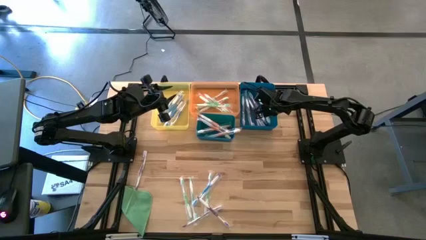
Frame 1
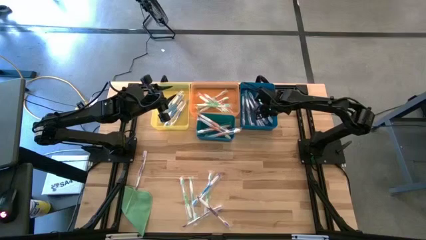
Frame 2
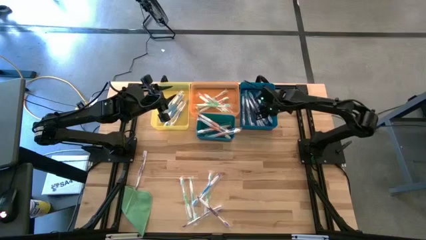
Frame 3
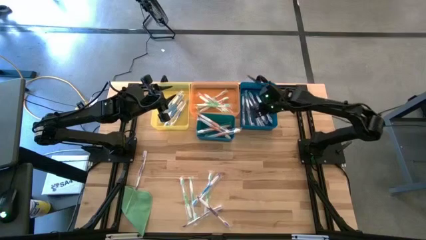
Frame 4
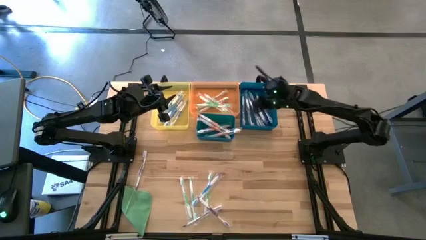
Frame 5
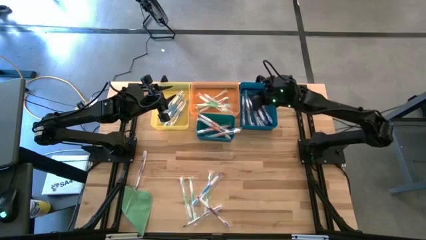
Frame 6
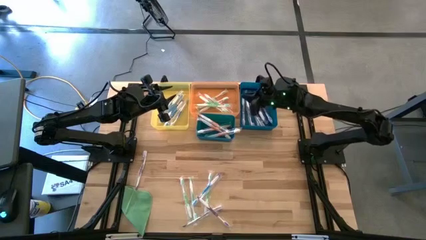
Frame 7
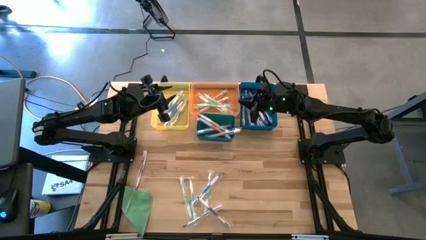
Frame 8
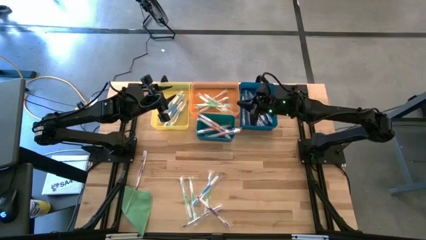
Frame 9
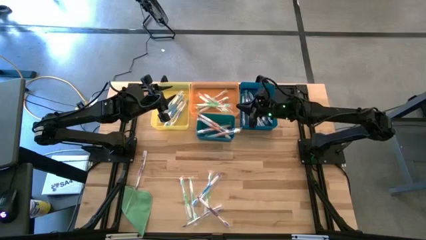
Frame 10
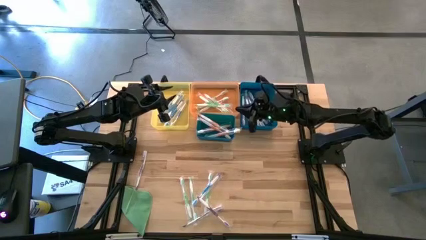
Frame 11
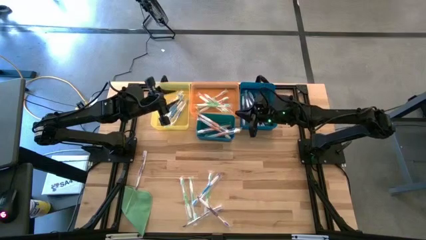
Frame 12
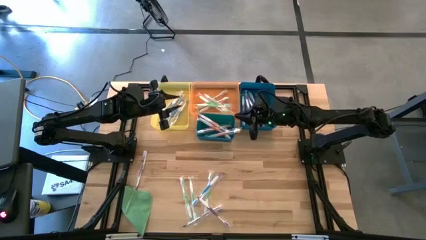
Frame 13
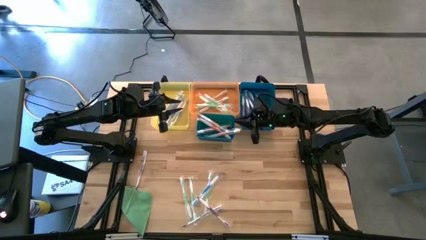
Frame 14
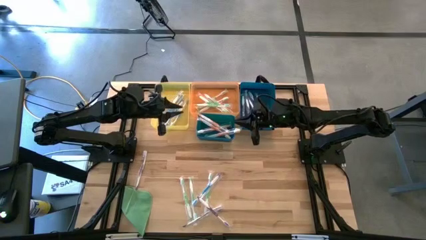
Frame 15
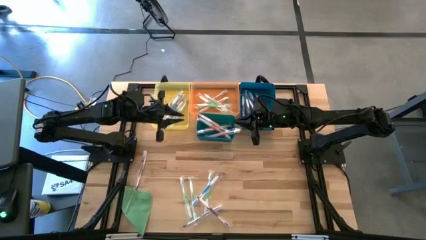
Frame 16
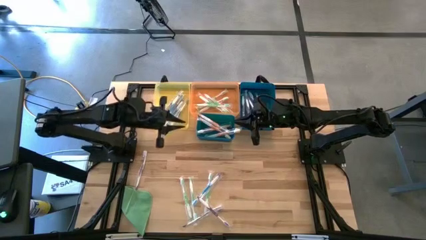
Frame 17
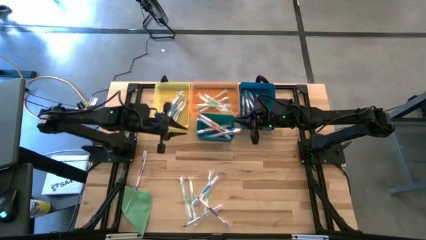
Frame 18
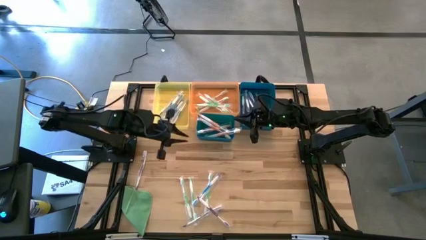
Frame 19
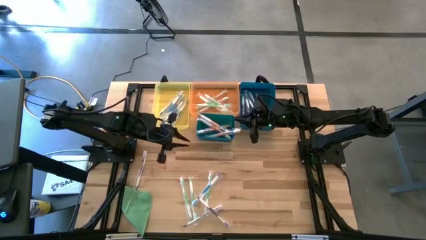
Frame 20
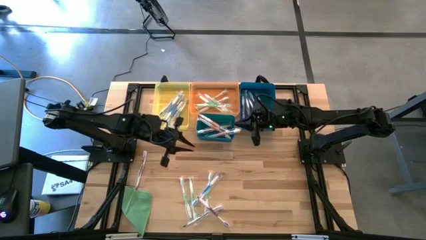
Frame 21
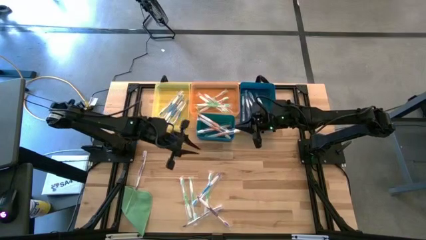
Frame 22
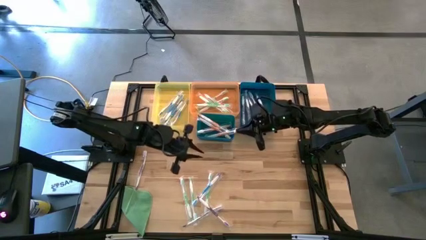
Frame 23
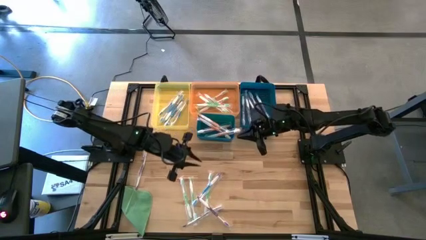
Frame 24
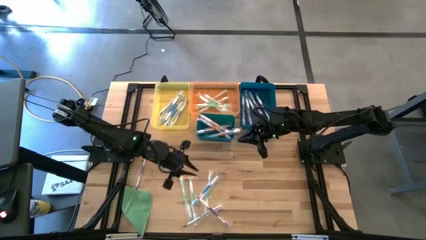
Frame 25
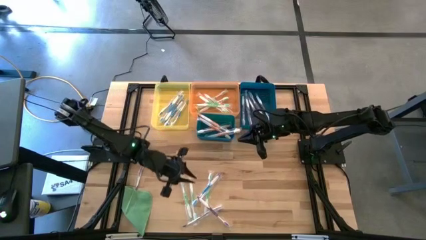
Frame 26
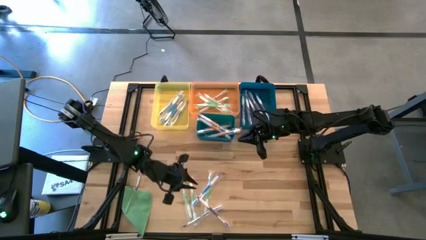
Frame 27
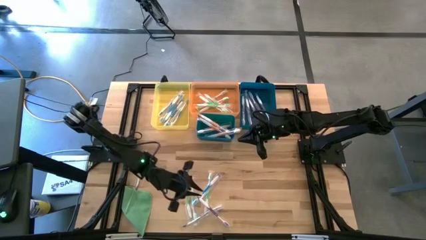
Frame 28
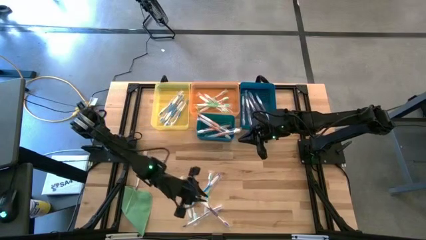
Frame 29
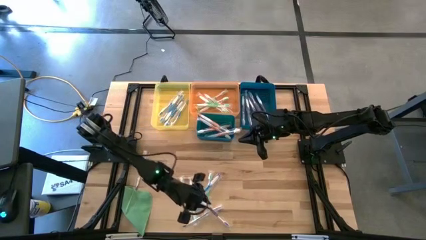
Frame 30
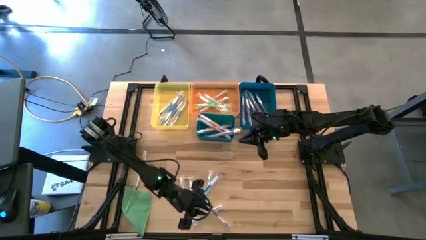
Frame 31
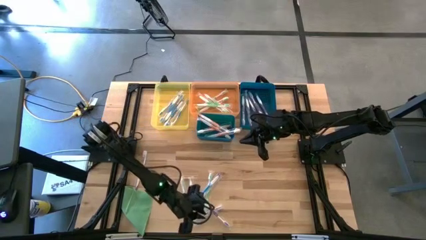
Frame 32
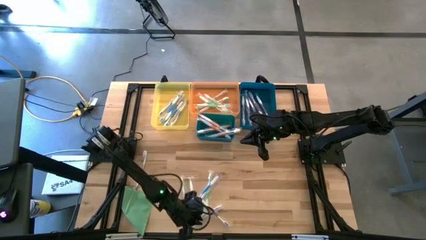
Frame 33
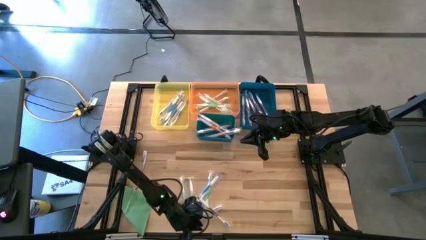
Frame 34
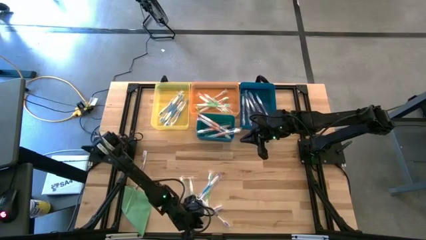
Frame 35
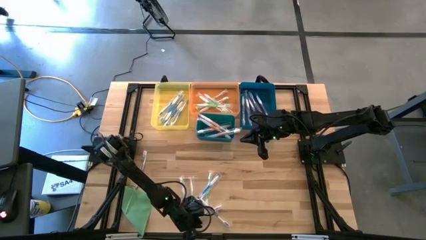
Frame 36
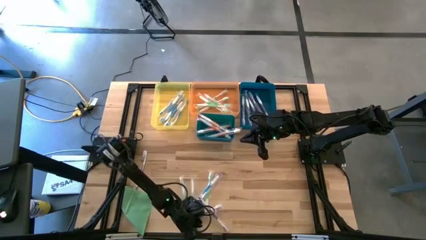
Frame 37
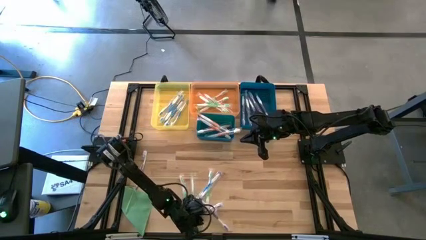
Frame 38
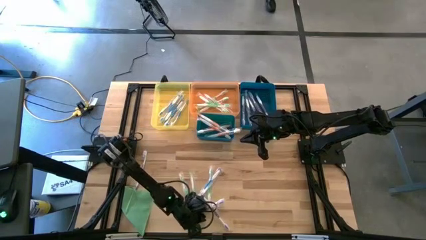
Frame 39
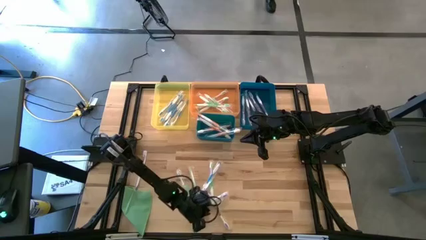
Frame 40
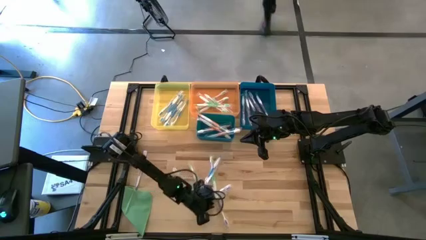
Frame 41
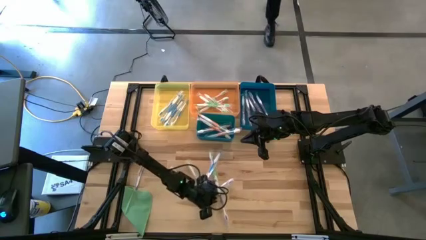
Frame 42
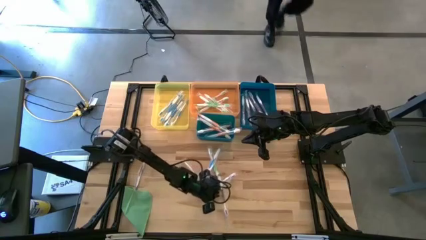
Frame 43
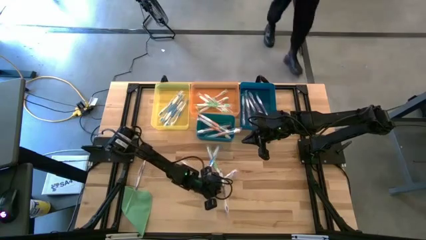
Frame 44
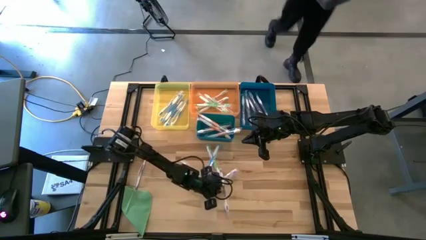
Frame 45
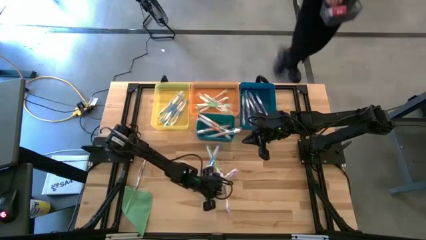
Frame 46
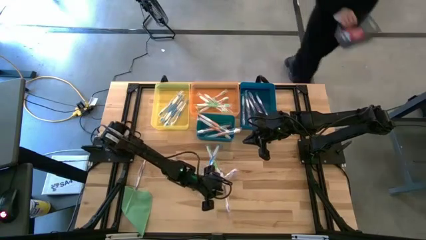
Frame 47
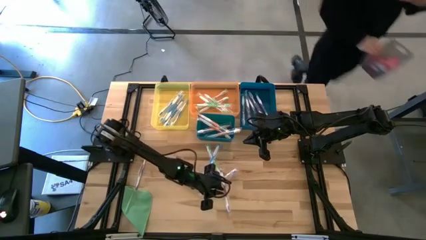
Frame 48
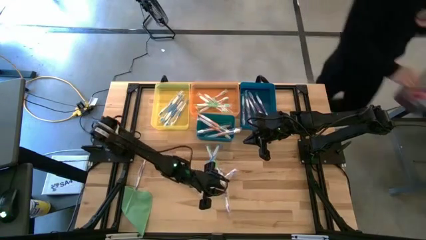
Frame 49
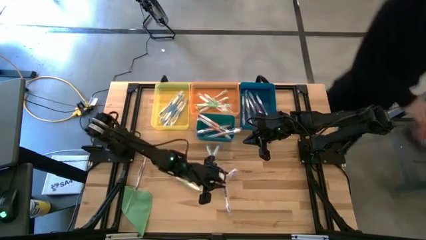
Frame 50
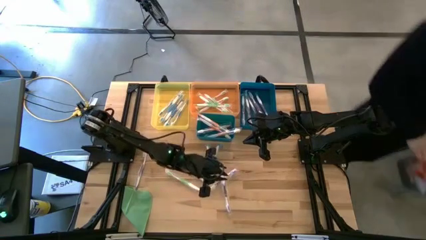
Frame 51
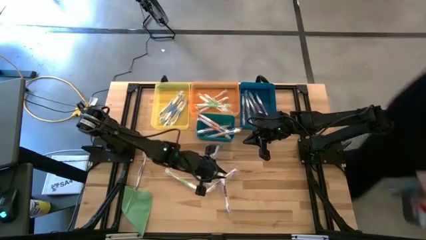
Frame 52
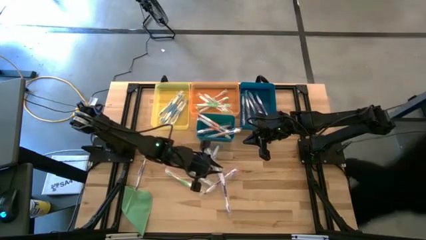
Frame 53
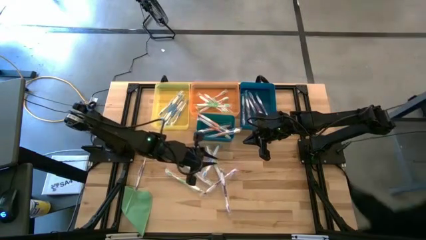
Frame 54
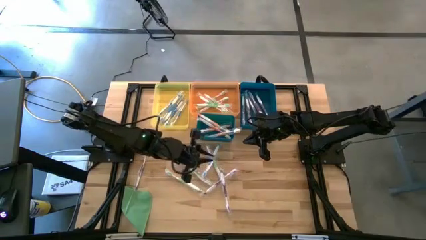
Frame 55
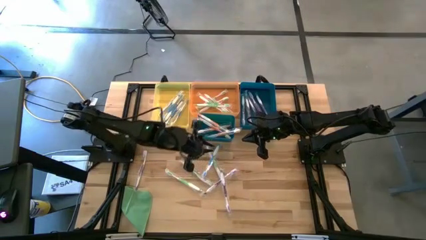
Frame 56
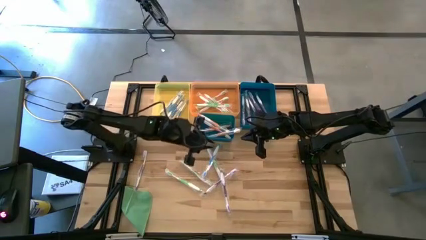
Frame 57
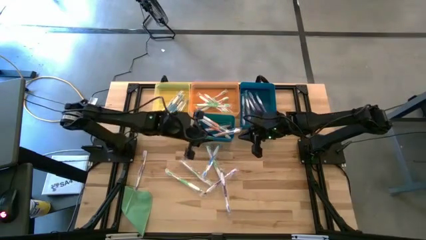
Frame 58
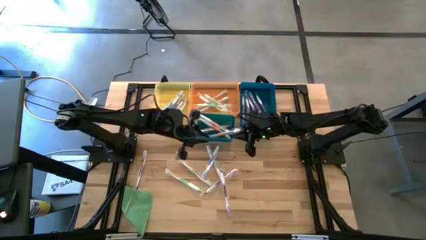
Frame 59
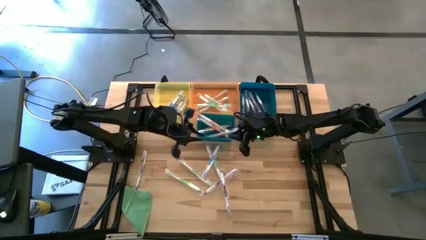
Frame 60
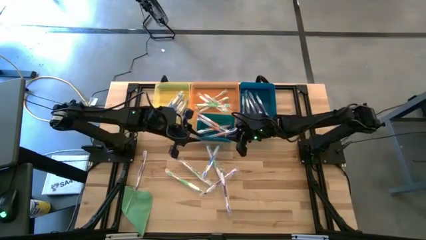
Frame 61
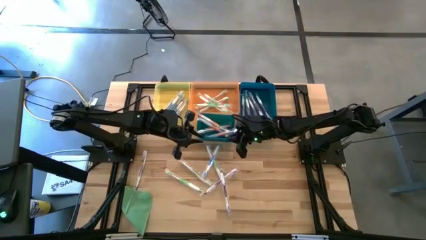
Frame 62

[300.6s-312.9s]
Task: Pick & Place Toothbrushes
Put the purple toothbrush into the blue bin
